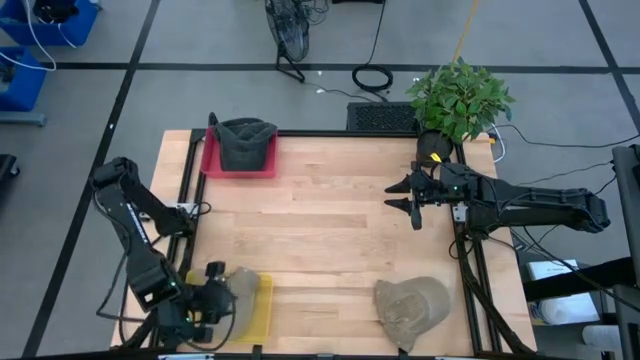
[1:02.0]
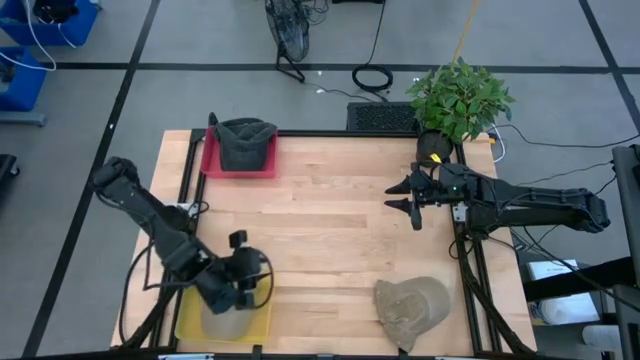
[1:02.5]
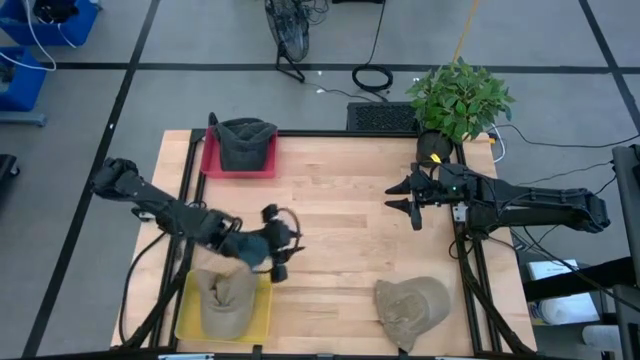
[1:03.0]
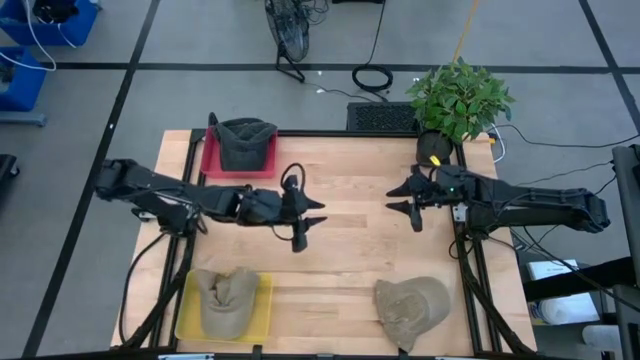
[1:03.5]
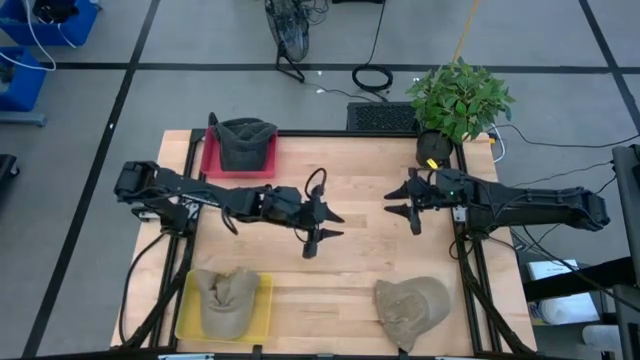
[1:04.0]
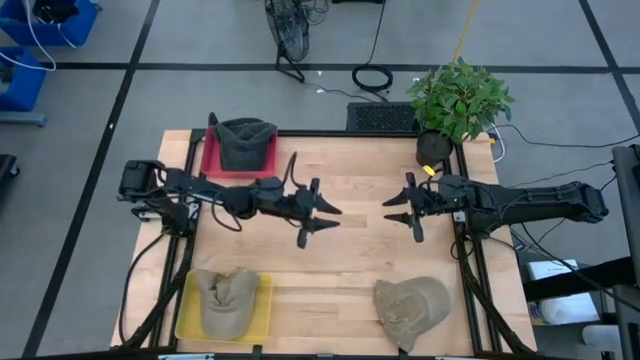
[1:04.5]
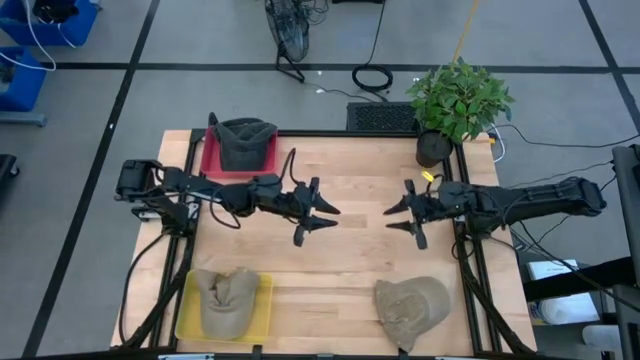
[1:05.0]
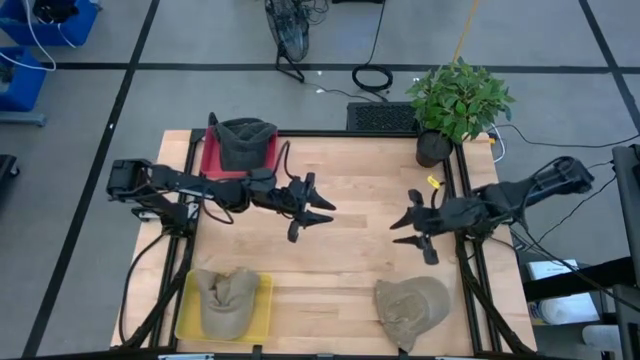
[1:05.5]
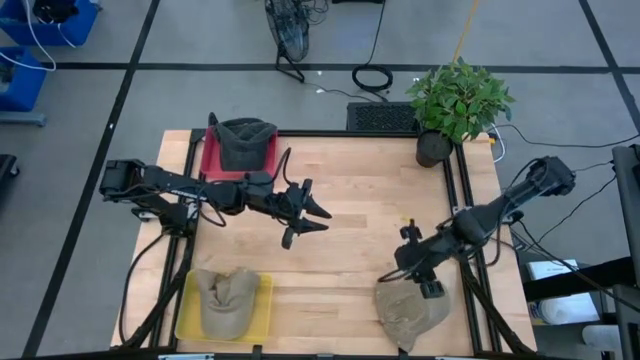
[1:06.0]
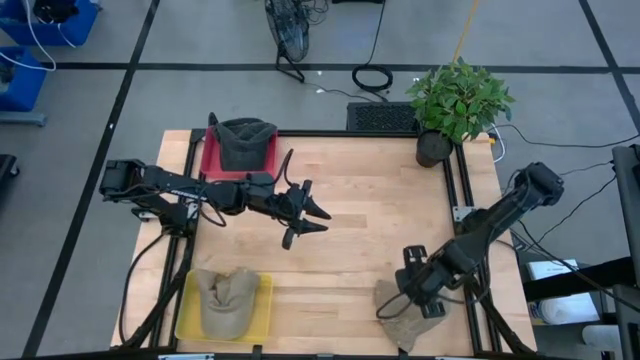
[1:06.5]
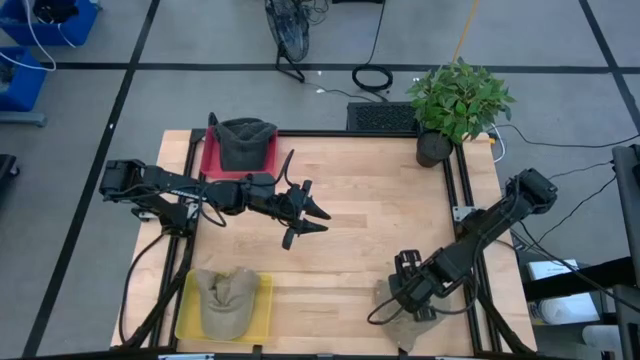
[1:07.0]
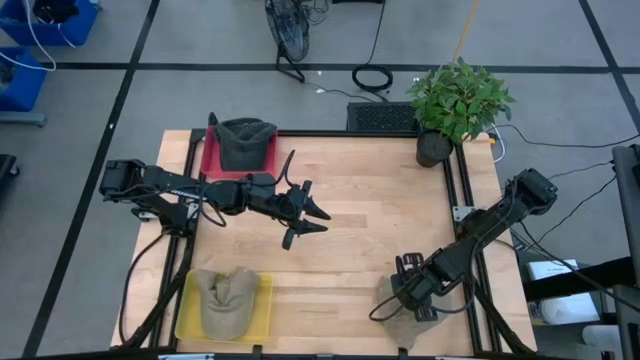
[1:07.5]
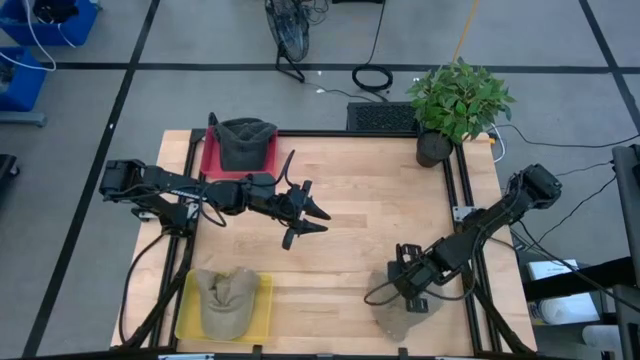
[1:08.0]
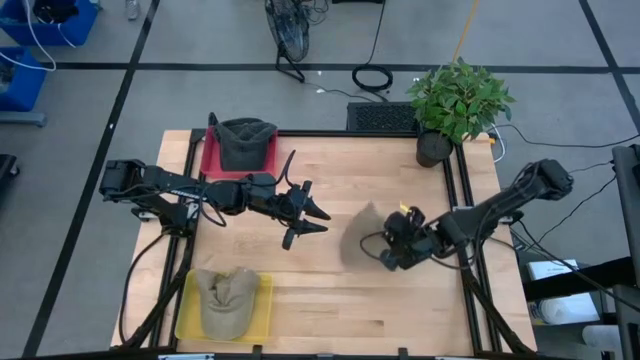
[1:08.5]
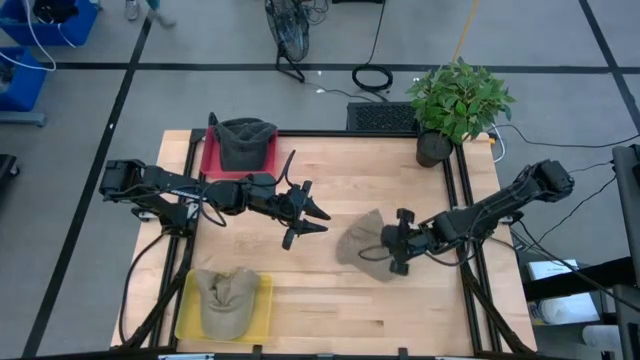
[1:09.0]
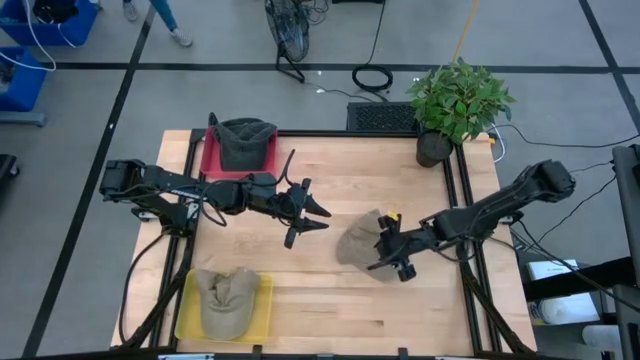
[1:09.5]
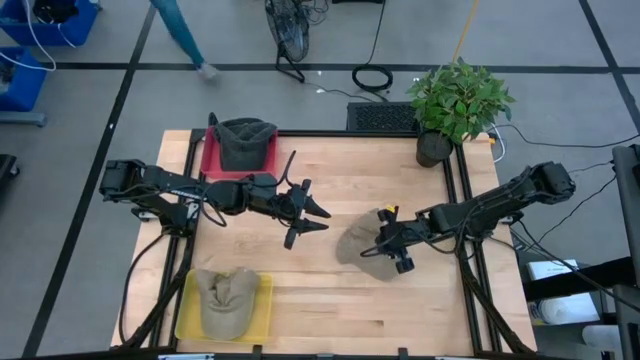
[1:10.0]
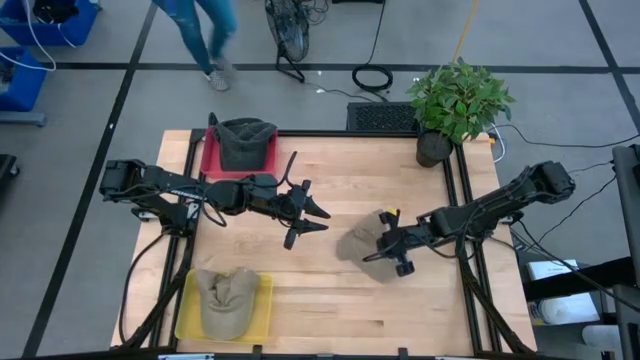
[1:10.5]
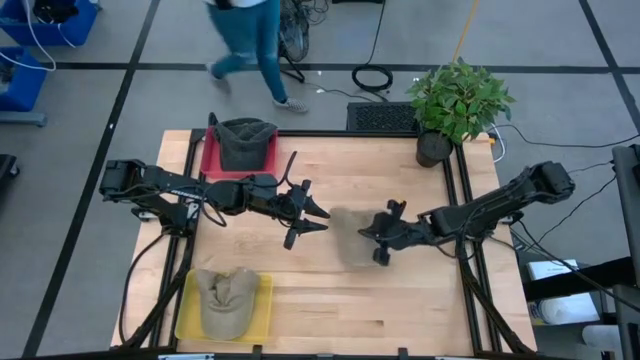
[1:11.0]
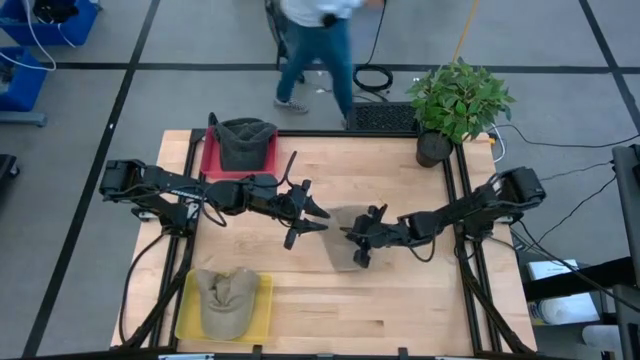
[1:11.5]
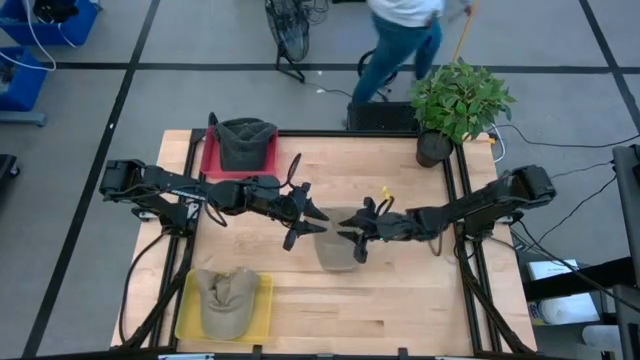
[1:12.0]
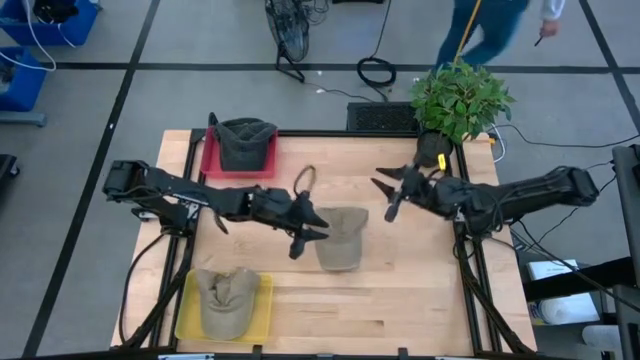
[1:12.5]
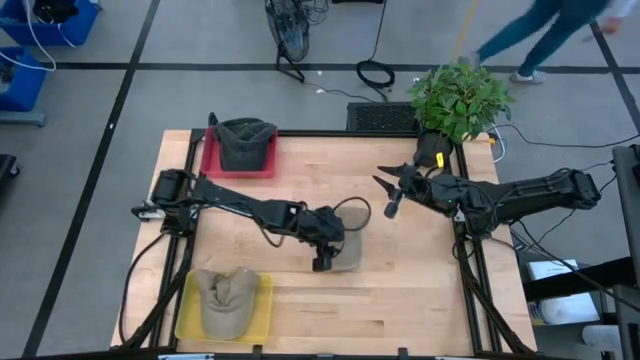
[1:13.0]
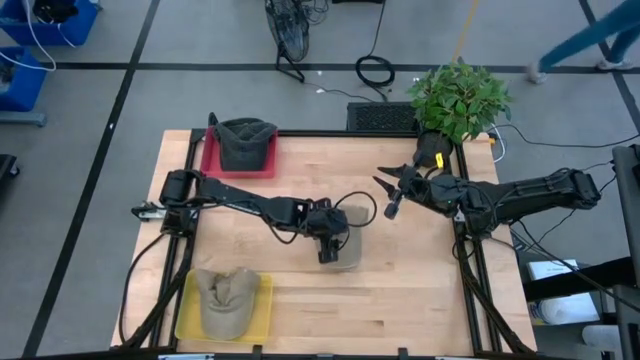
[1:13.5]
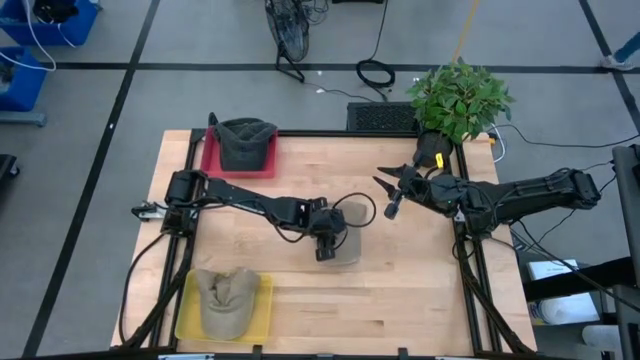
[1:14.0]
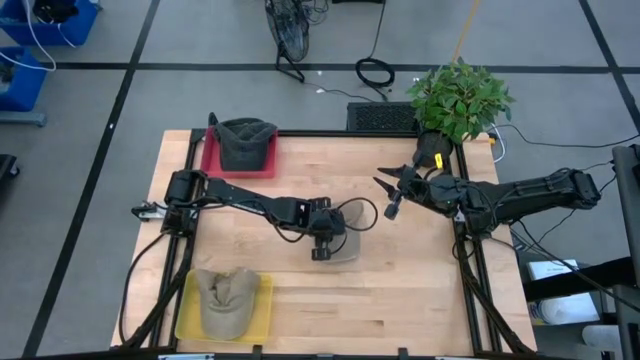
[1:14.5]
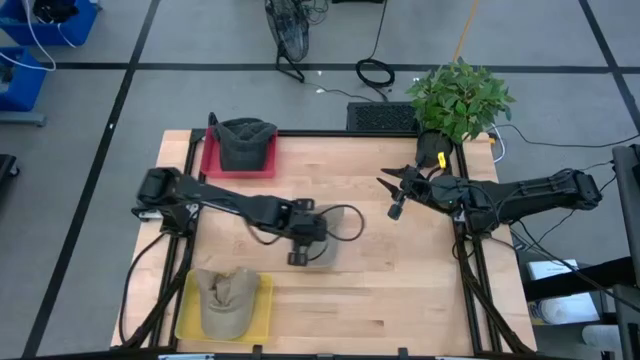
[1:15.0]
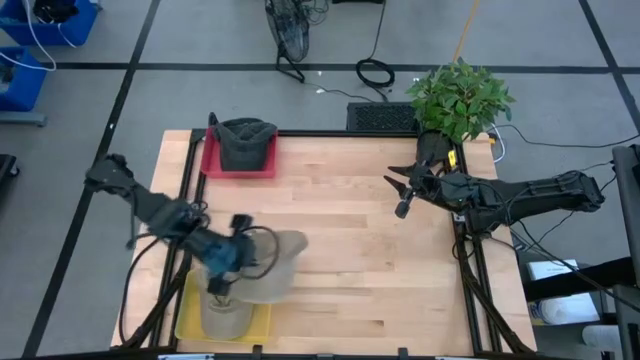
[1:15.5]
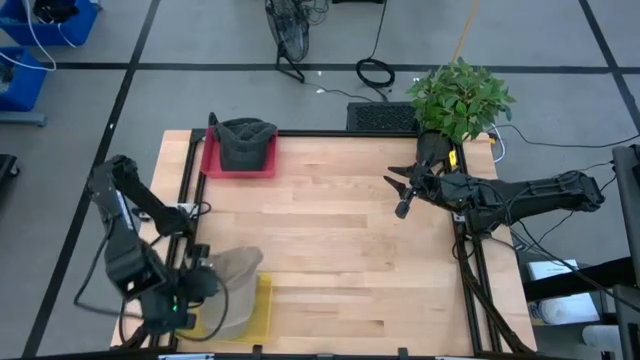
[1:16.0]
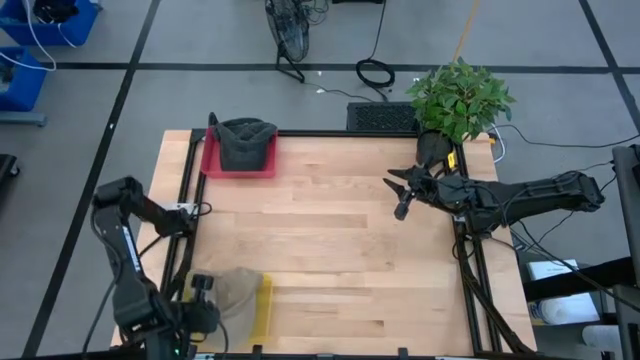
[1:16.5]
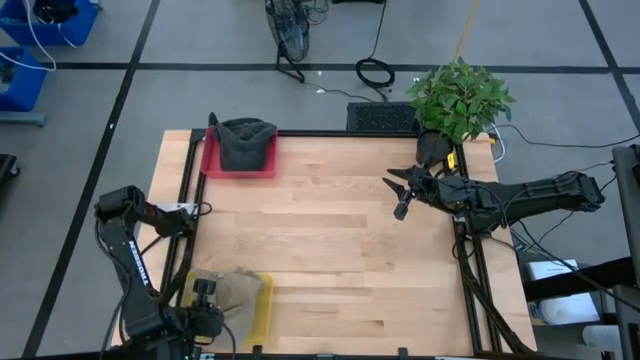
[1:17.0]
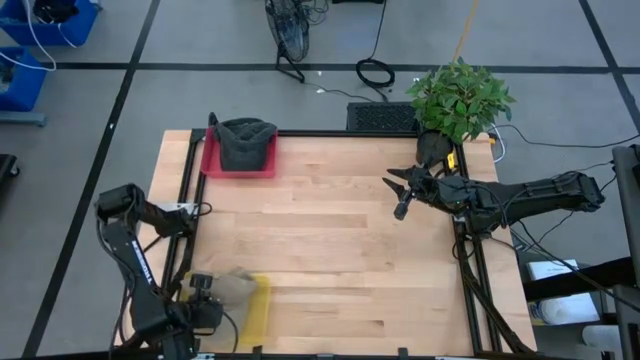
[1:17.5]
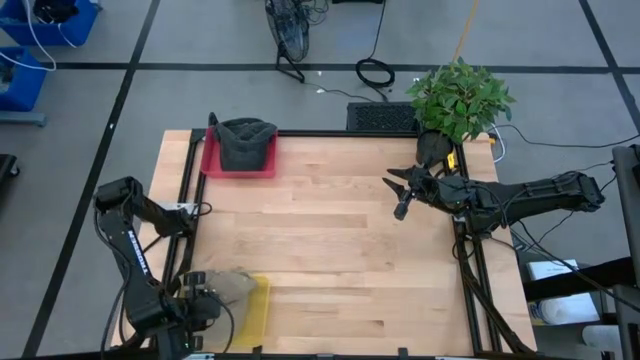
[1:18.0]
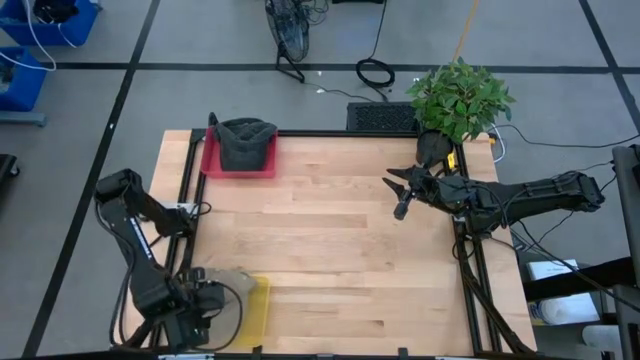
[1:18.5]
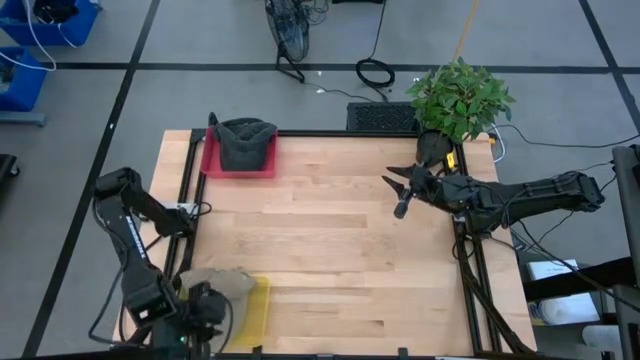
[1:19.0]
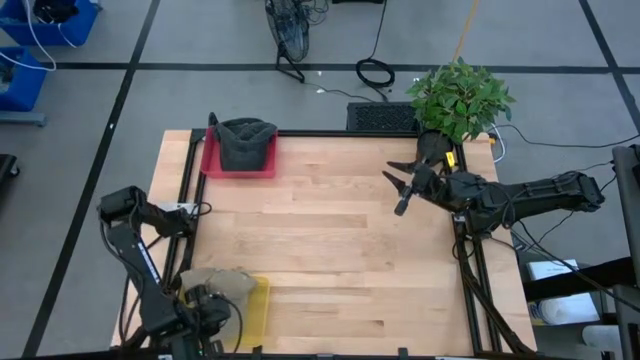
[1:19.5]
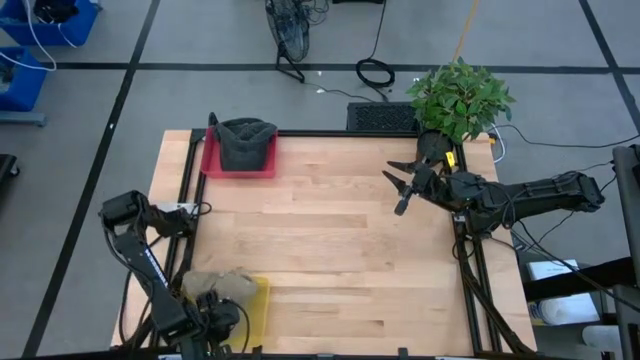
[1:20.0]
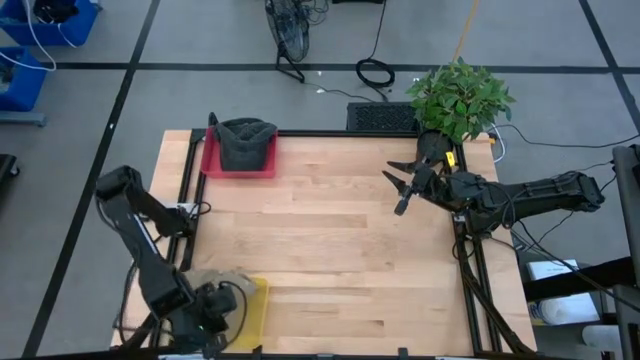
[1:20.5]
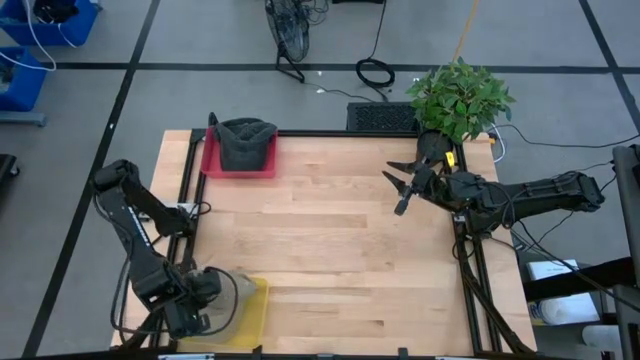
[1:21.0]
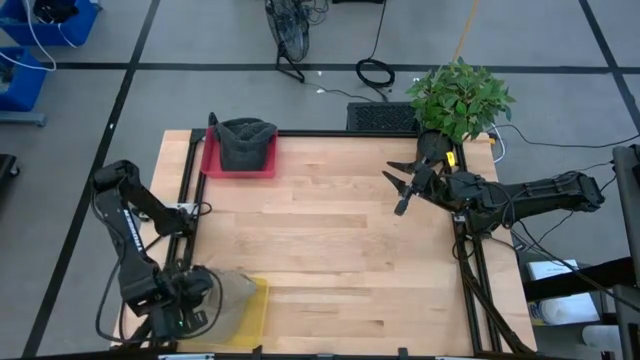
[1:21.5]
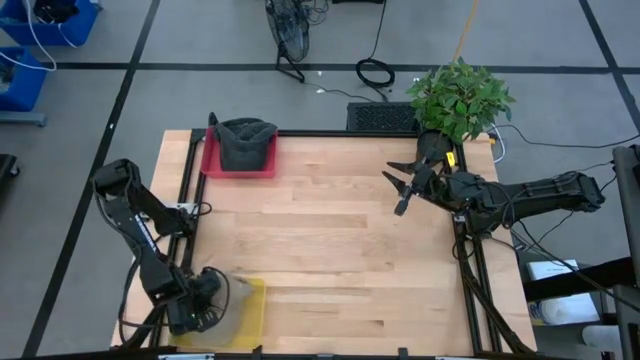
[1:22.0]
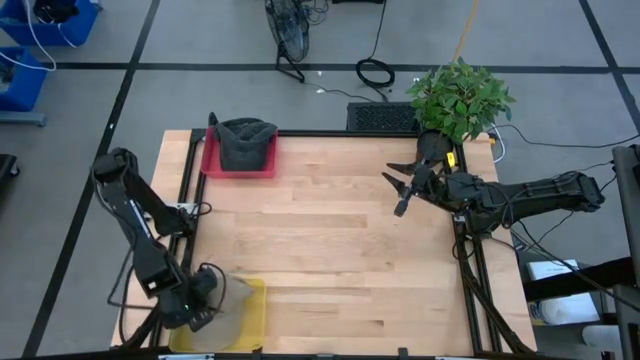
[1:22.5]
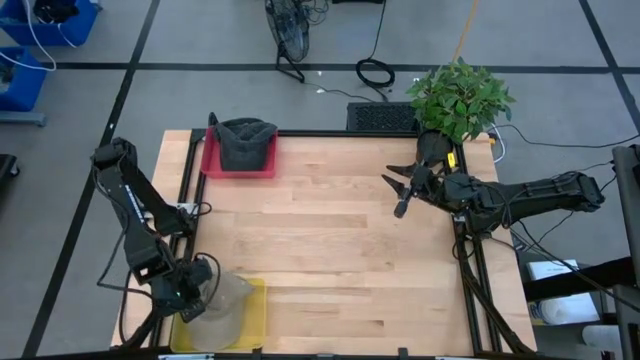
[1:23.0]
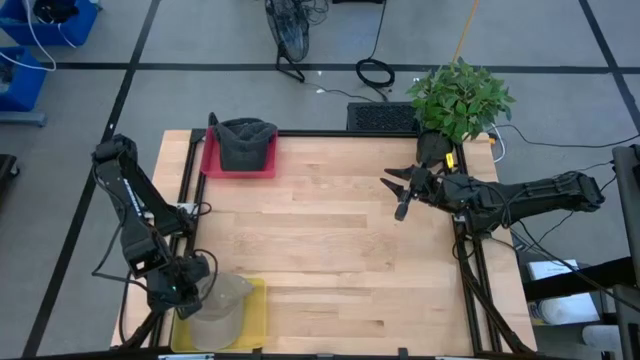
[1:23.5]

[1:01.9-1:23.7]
Task: Pick & Place hat
Put the brown cap into the yellow bin
